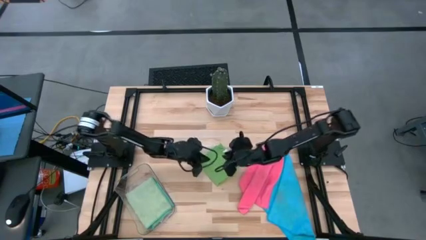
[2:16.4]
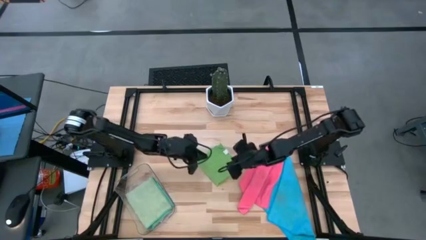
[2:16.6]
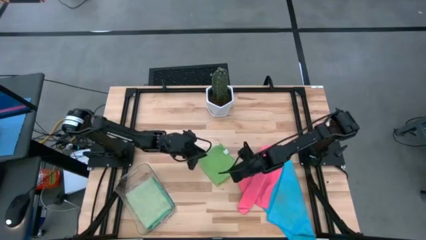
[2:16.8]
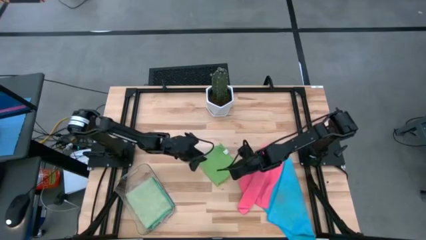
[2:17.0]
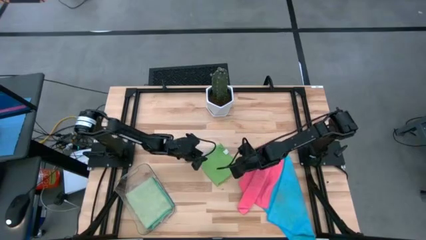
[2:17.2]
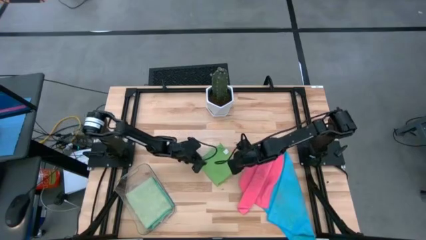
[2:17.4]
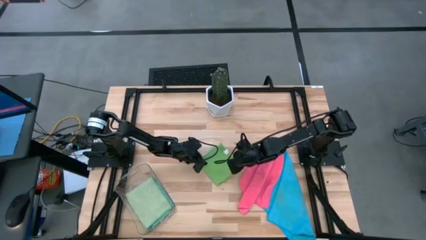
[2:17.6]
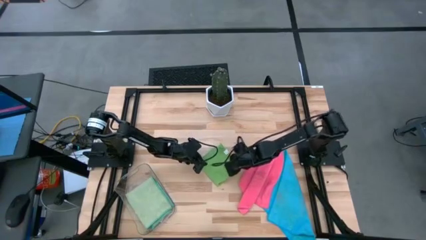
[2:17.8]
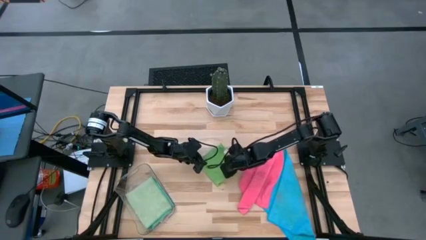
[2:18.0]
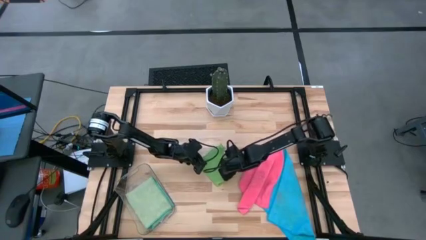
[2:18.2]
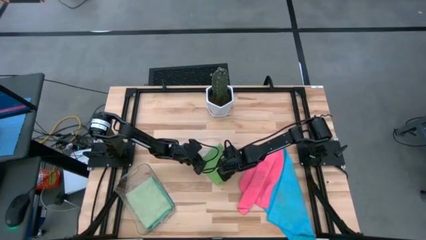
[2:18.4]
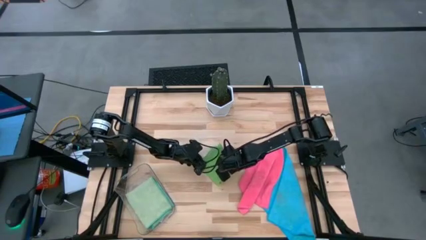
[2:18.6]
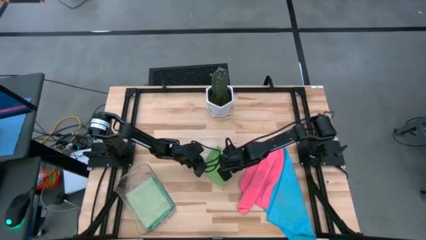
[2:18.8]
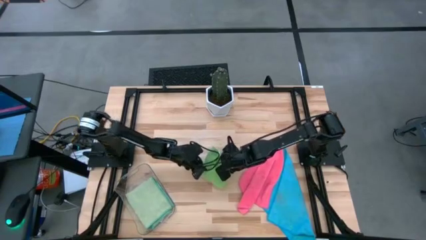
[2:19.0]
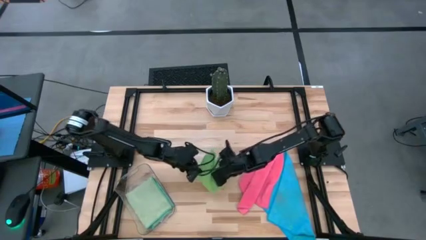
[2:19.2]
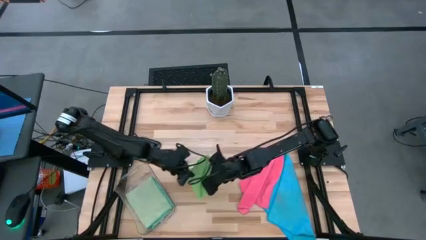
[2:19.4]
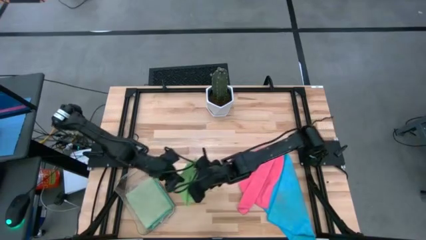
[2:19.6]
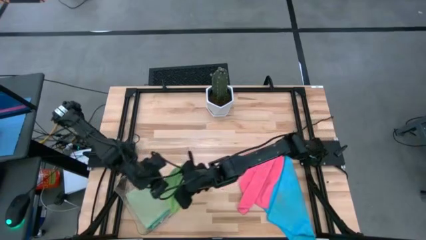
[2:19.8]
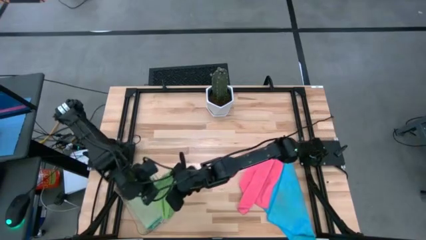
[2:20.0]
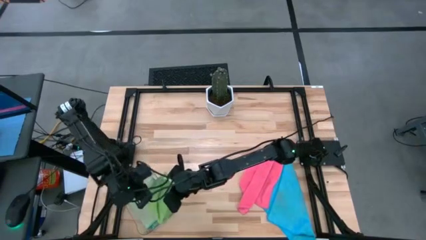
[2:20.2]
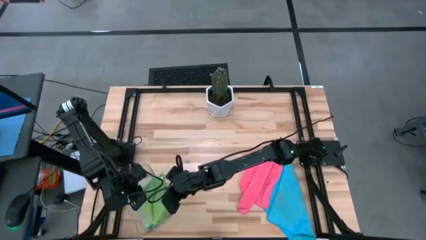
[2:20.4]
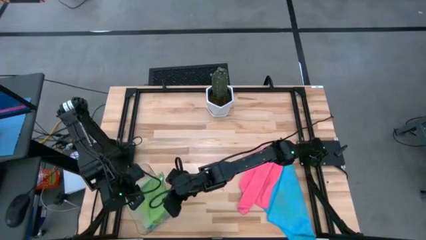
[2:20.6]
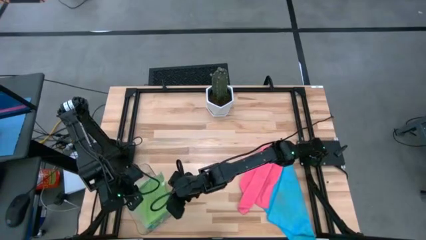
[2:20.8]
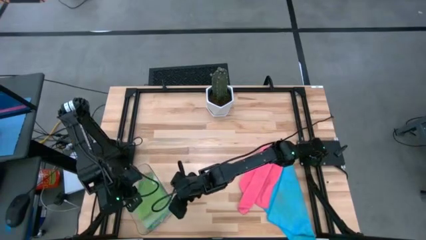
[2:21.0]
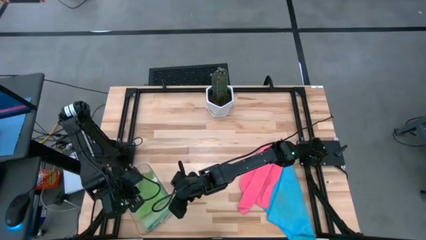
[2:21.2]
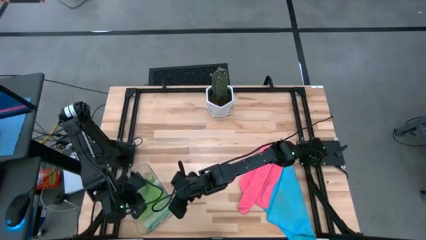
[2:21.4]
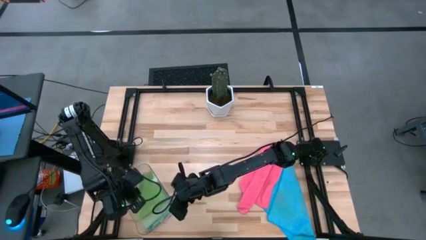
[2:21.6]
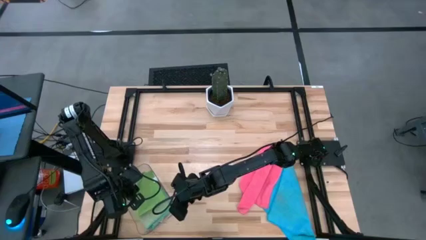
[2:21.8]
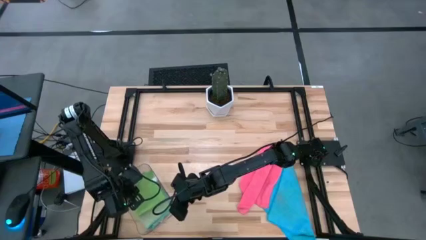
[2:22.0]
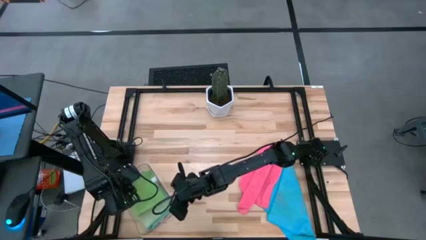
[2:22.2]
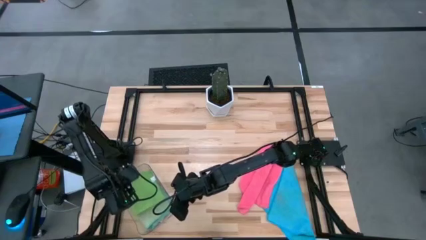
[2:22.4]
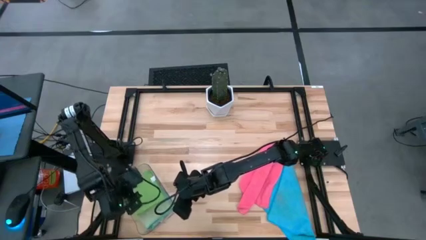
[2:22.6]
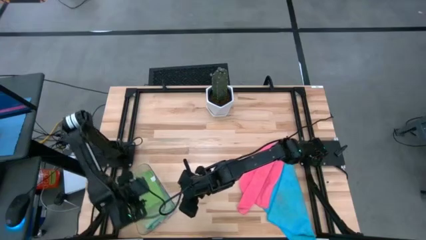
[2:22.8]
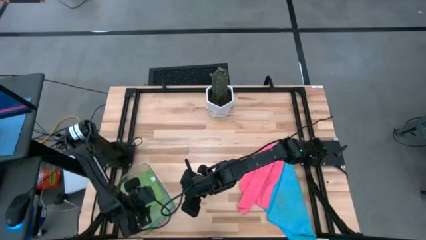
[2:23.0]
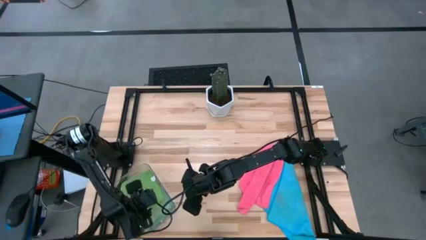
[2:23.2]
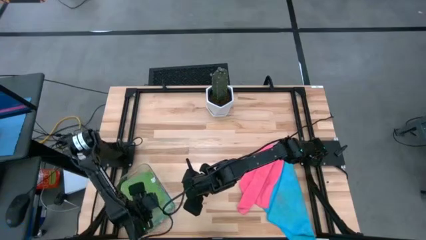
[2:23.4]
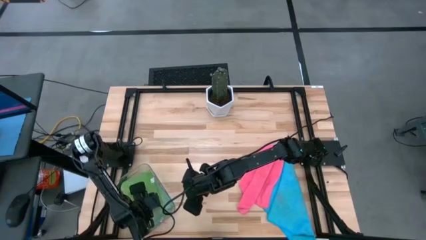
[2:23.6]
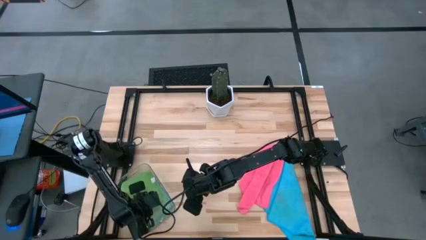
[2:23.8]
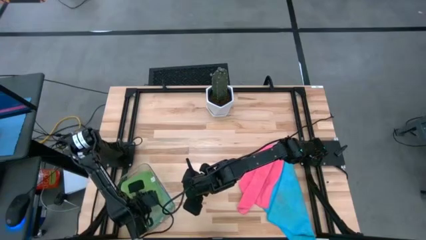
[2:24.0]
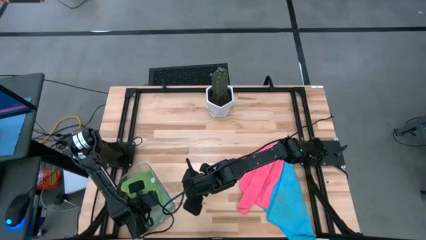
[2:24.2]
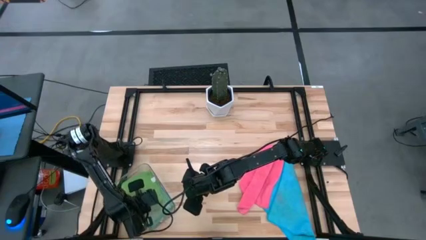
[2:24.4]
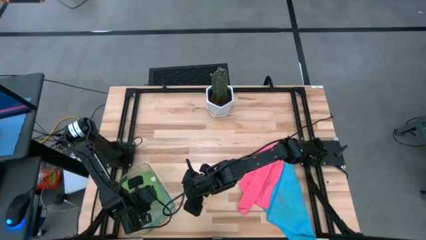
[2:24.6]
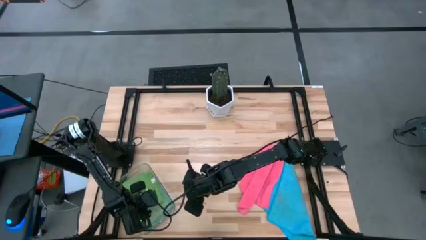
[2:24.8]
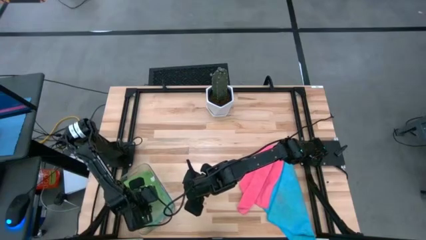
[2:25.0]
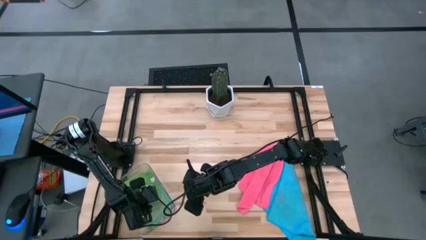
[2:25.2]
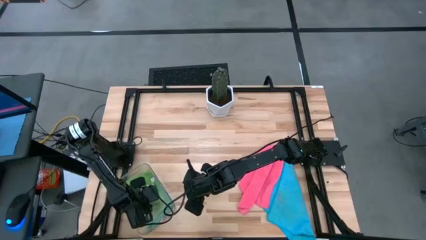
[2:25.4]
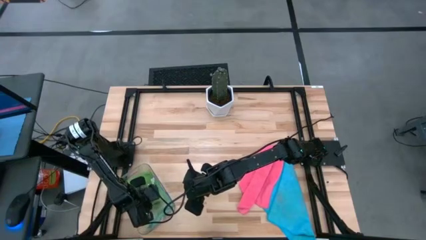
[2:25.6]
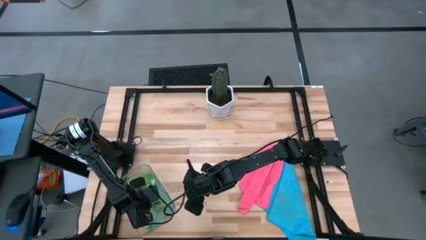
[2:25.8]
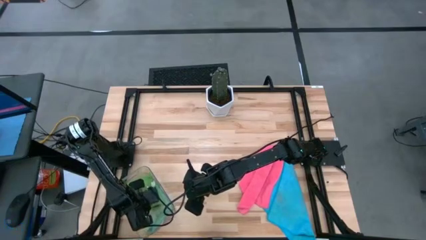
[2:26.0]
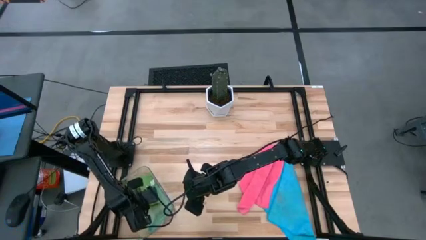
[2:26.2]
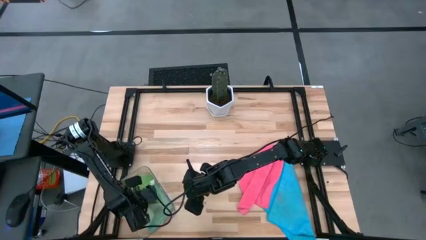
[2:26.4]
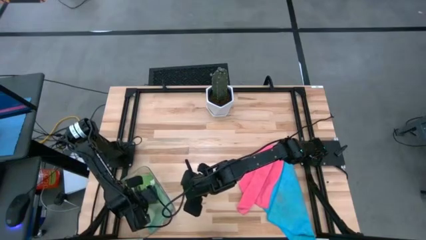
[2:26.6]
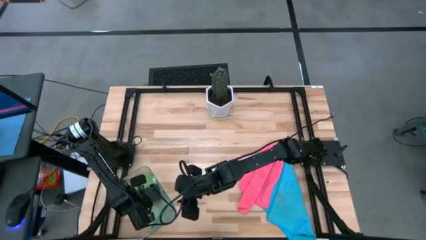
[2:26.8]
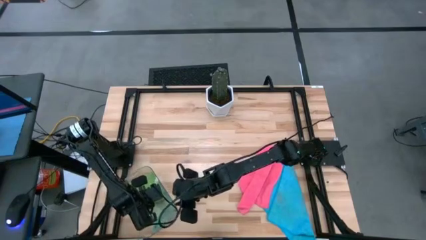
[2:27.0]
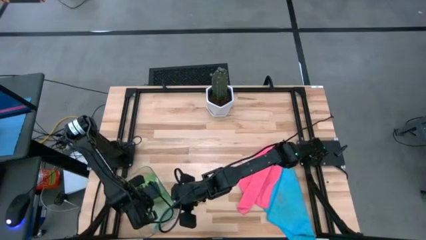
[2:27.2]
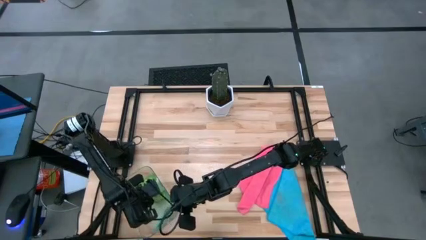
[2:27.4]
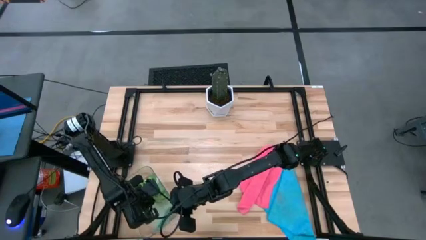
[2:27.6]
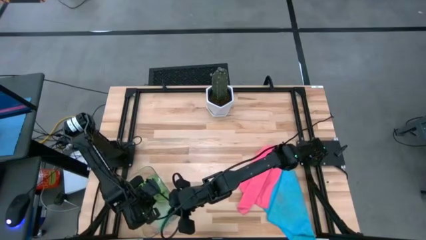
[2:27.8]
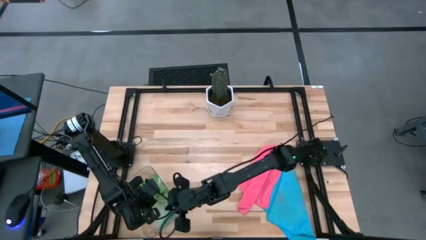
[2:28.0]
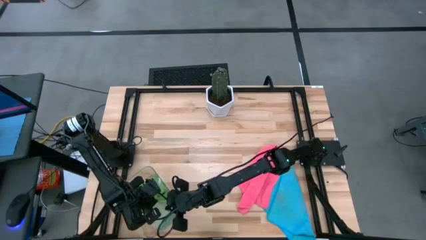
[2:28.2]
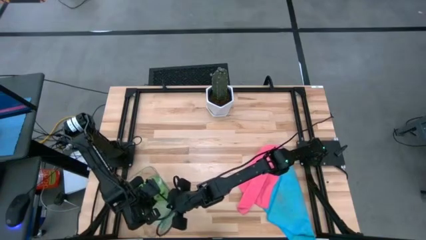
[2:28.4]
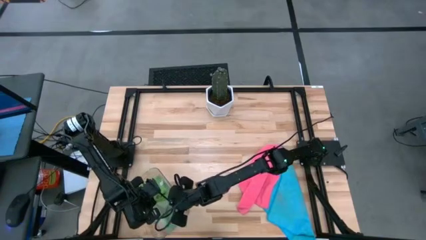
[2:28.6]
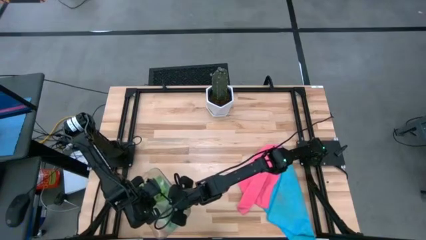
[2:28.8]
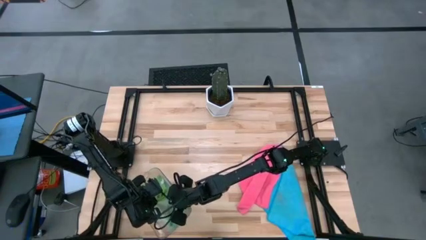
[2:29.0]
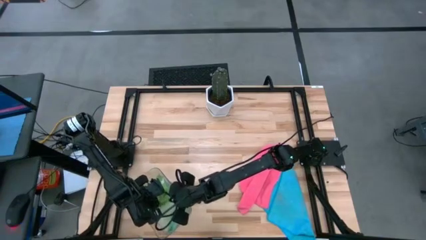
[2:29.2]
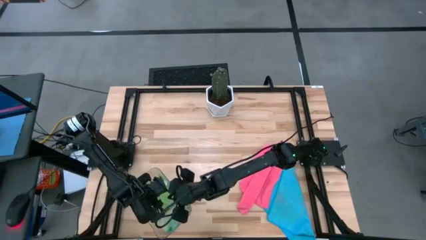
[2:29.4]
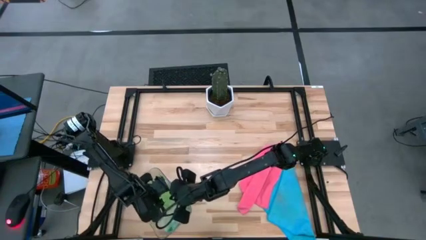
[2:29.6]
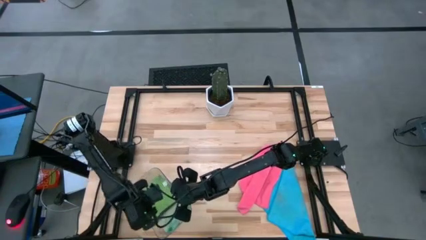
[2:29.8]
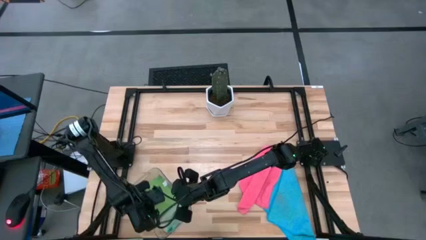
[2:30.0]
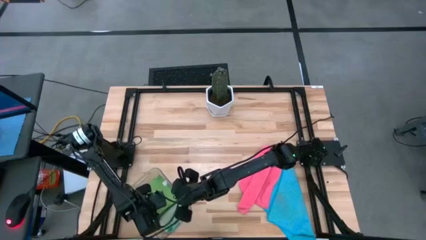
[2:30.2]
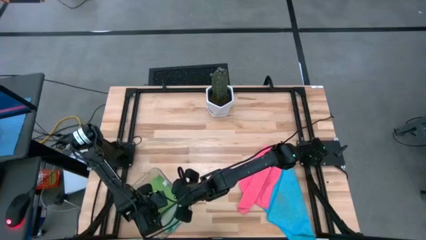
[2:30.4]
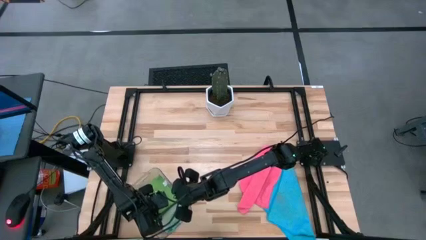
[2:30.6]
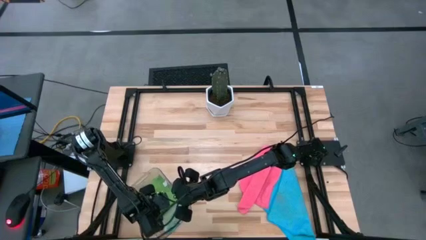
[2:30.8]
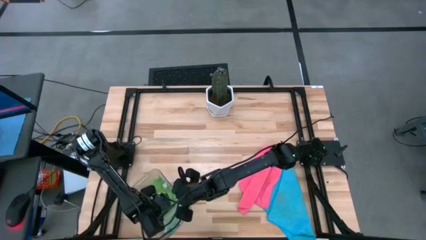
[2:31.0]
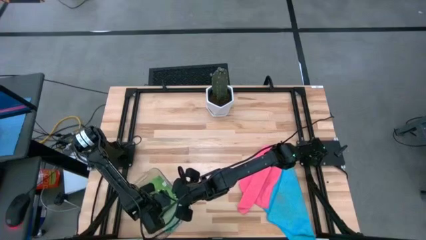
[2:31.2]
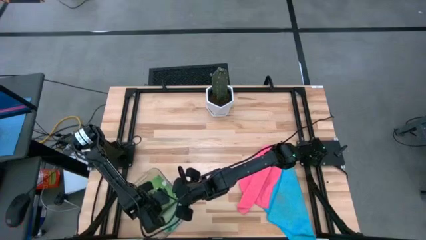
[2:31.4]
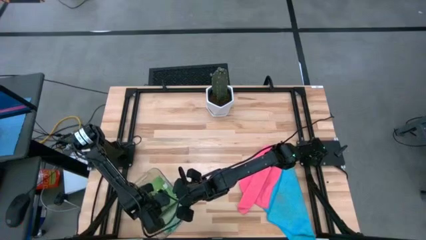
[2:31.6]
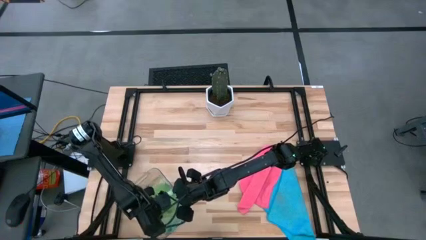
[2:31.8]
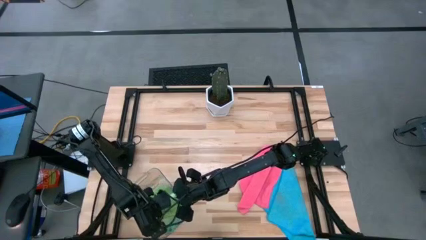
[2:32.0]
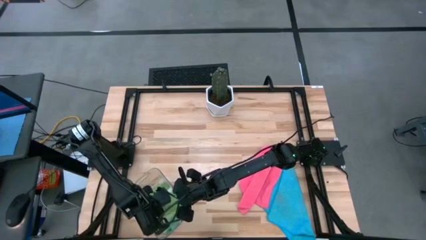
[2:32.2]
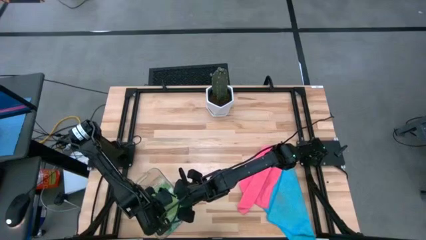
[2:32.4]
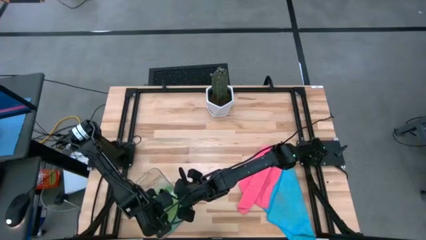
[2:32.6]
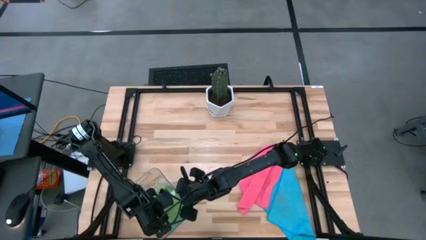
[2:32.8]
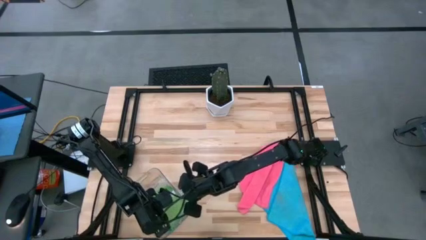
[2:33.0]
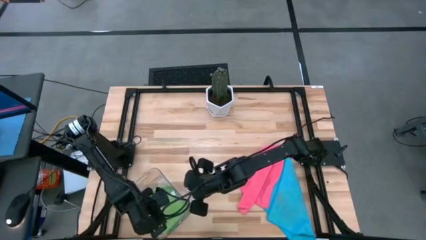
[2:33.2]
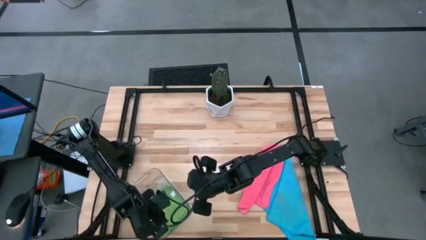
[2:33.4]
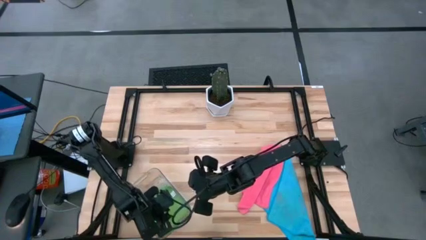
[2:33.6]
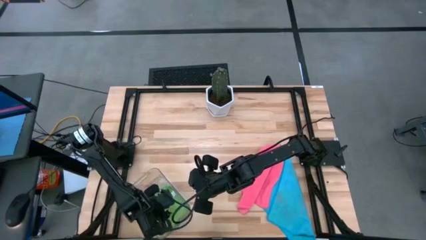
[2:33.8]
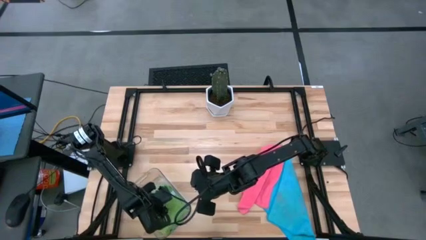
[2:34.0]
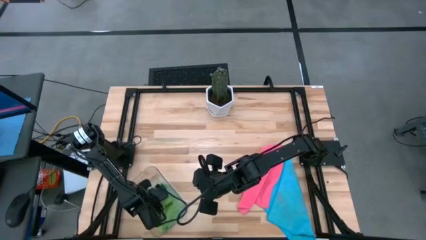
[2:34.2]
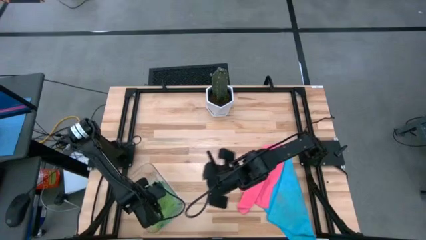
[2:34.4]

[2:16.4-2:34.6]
Task: Fold microfiber towels
Put the folded green microfiber cloth into the transparent bin
